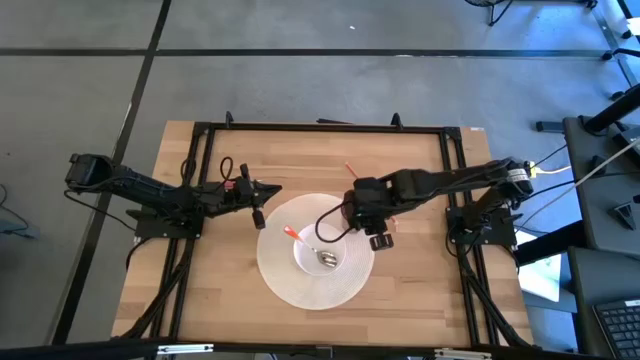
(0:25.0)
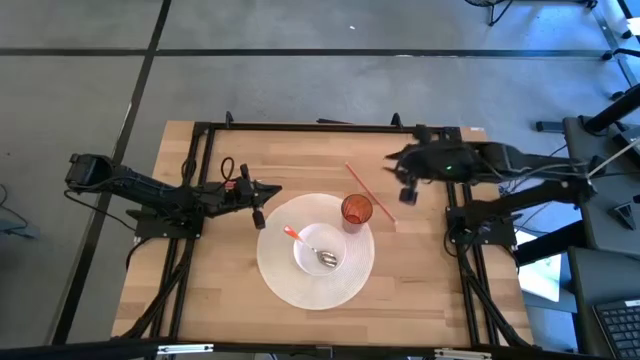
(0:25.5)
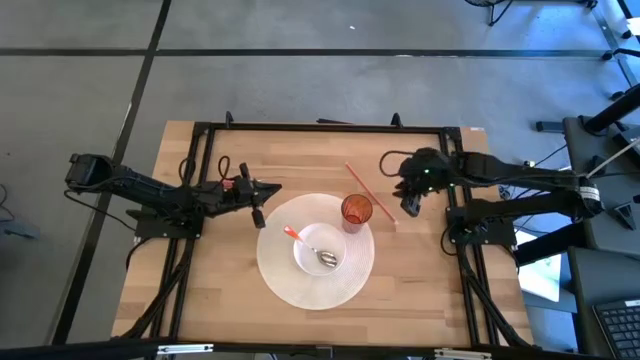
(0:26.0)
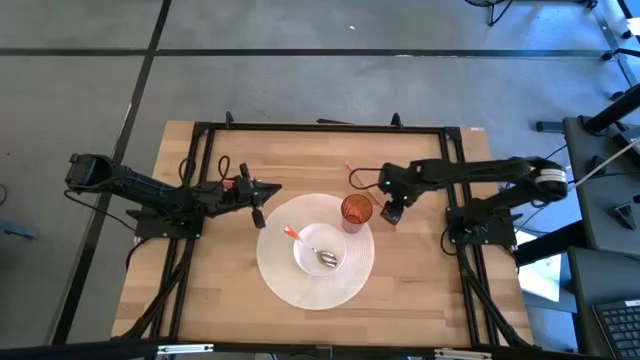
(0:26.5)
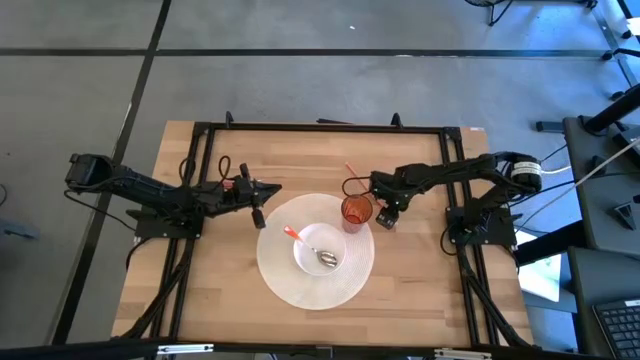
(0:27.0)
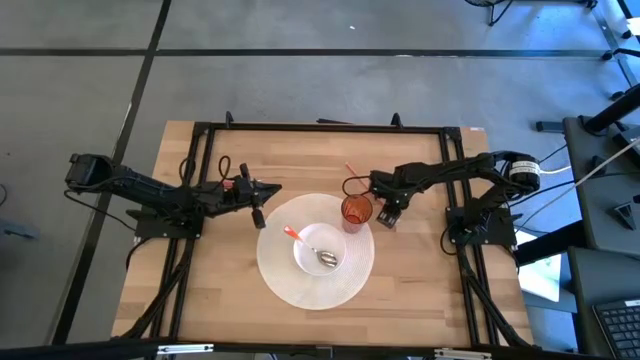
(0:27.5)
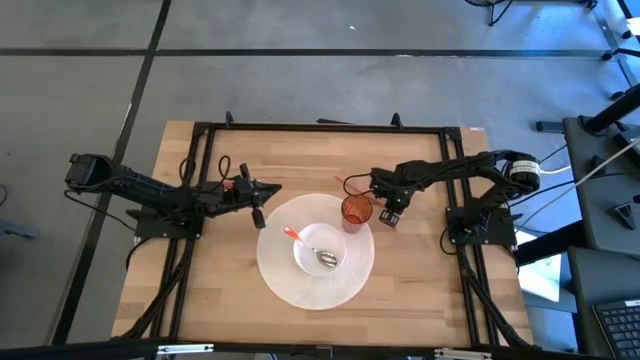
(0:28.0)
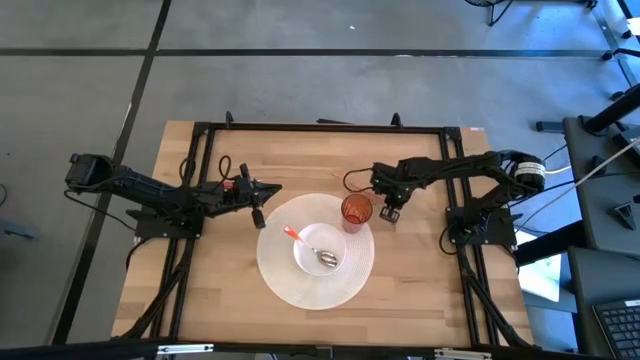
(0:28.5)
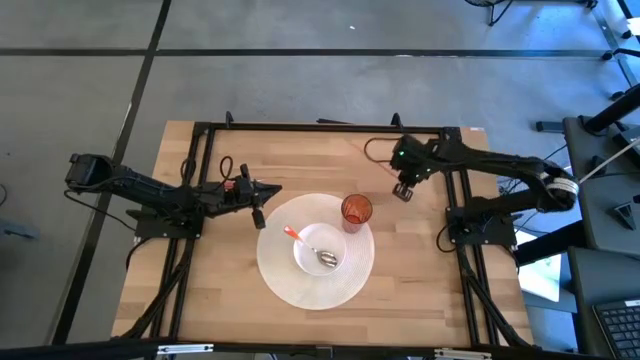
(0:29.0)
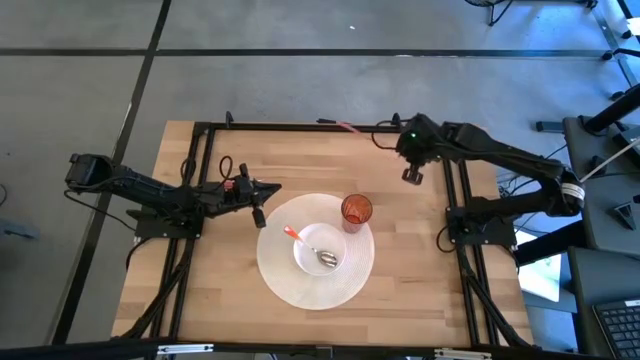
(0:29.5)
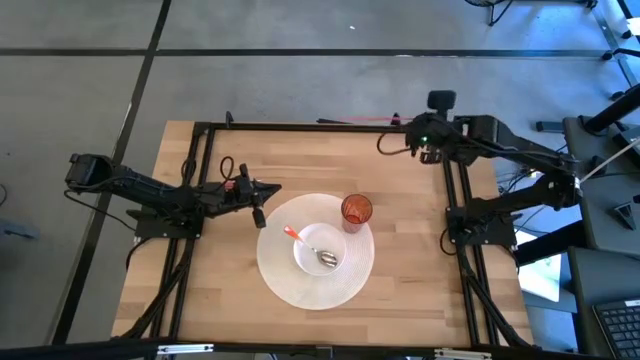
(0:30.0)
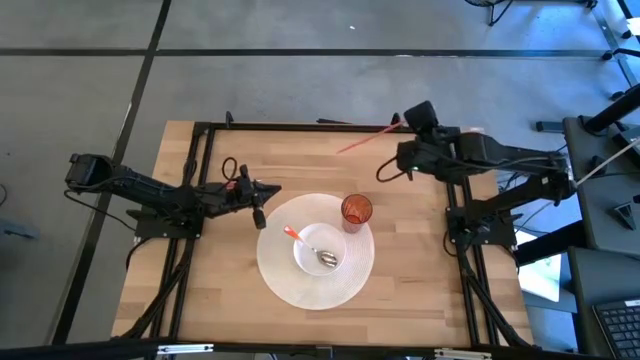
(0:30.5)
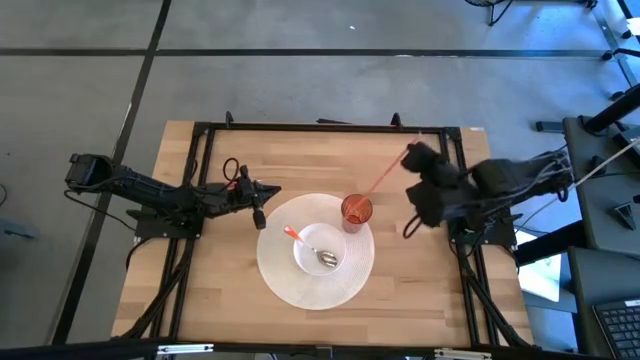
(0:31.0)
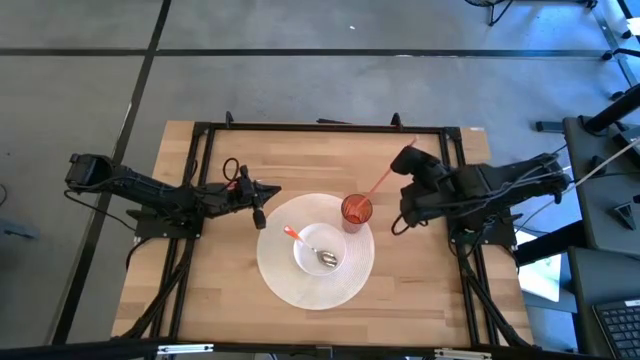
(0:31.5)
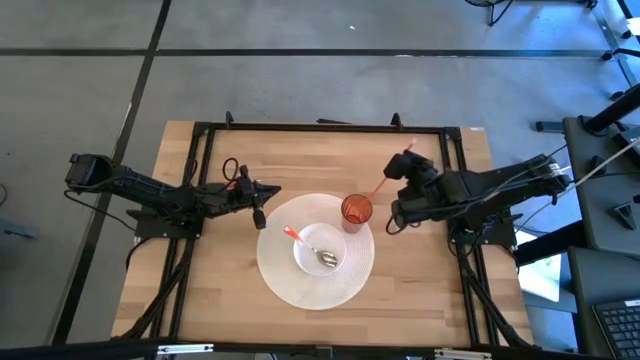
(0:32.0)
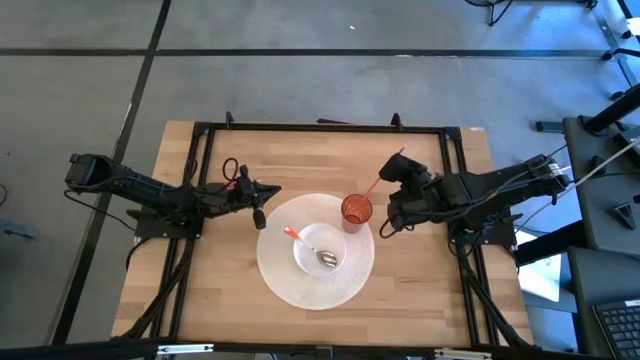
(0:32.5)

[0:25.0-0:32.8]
Task: Pick & Place Utensil
Put the red straw into the red cup

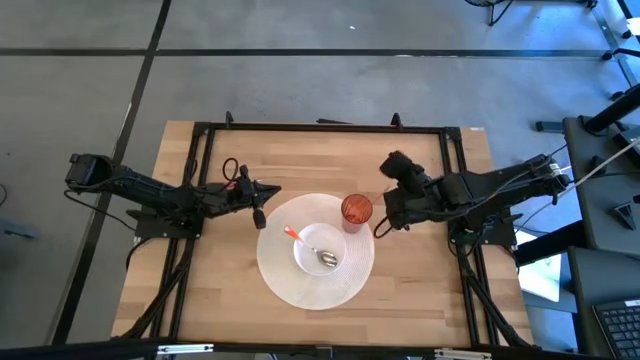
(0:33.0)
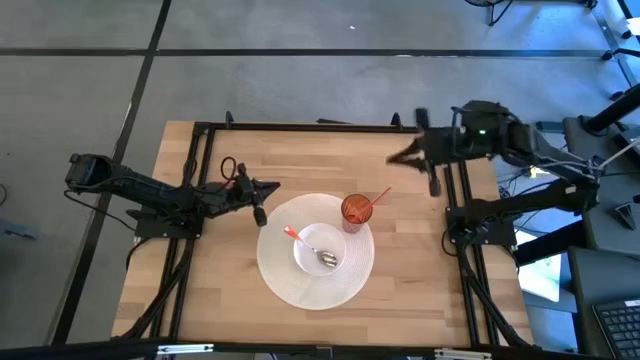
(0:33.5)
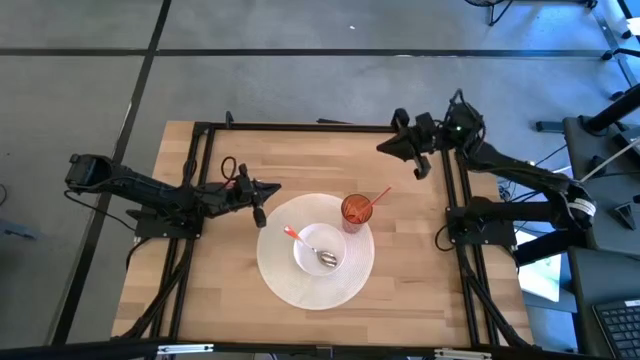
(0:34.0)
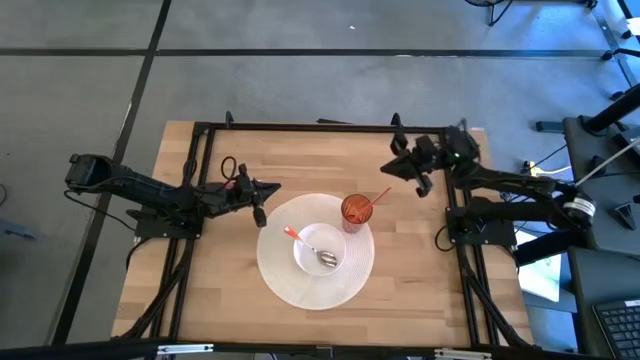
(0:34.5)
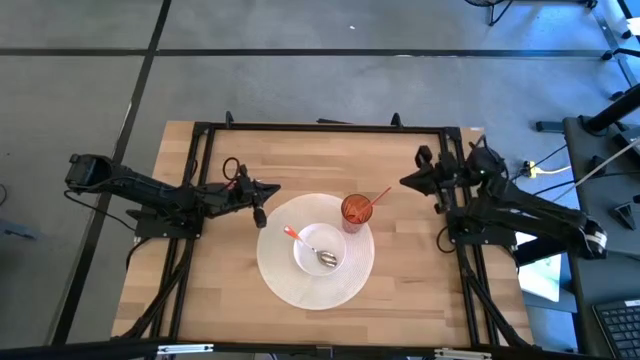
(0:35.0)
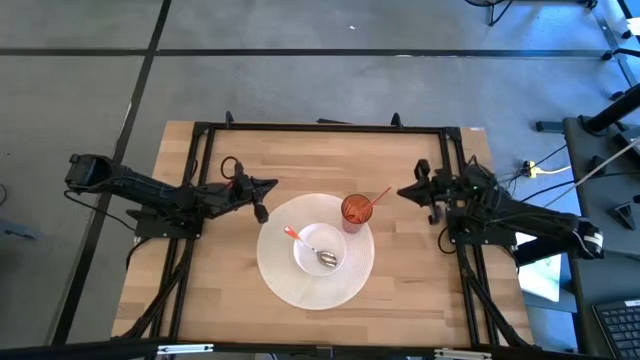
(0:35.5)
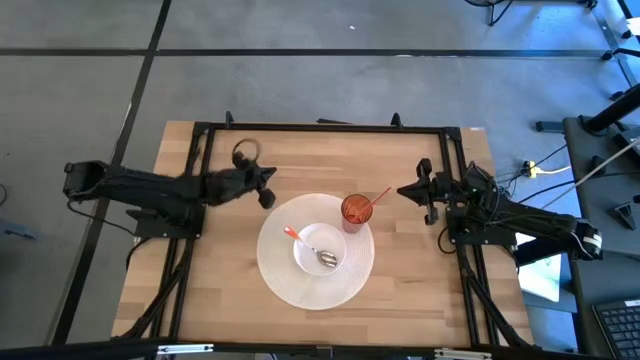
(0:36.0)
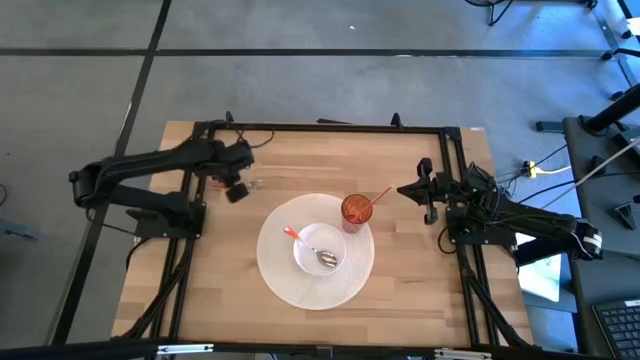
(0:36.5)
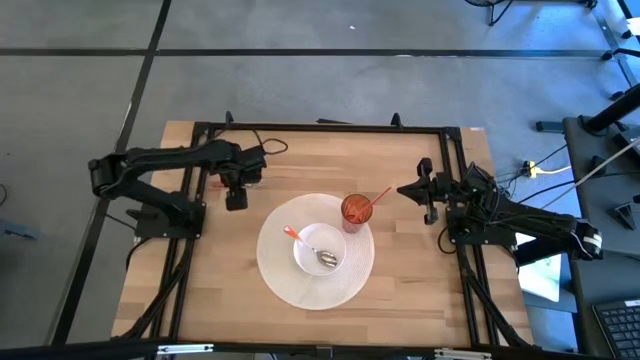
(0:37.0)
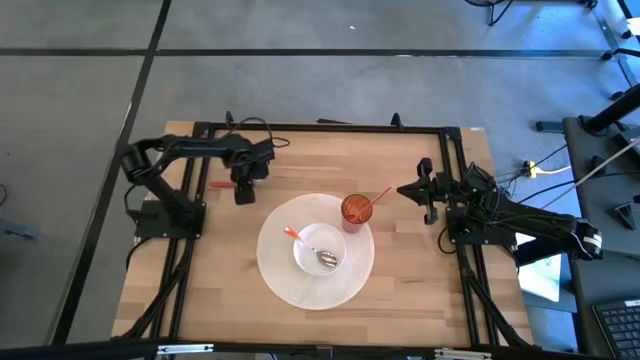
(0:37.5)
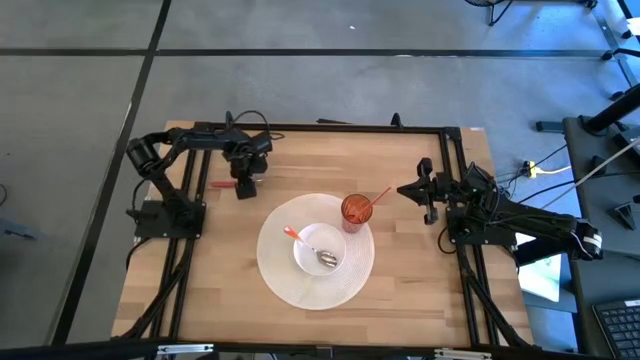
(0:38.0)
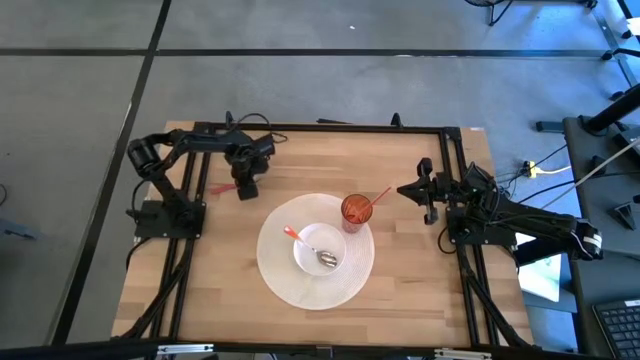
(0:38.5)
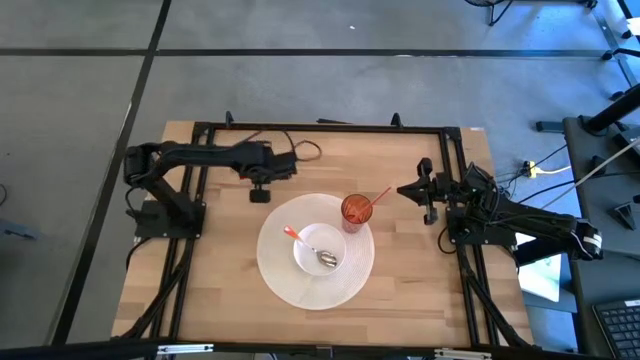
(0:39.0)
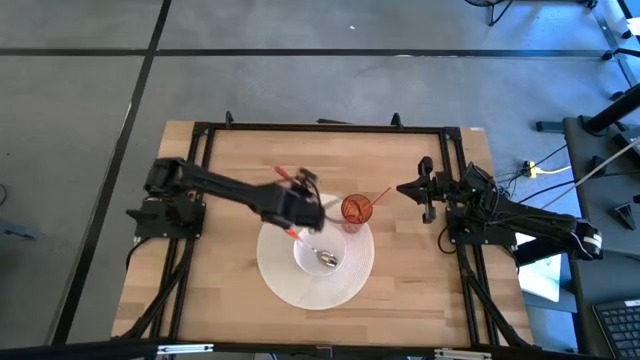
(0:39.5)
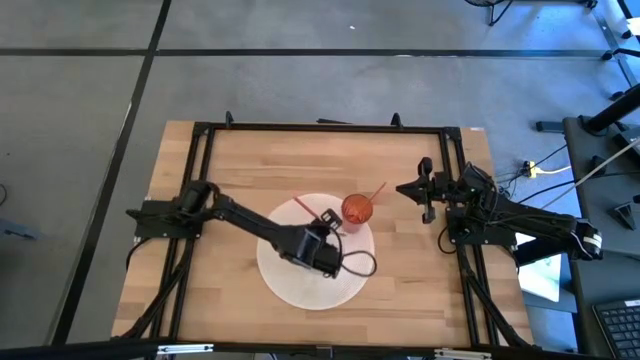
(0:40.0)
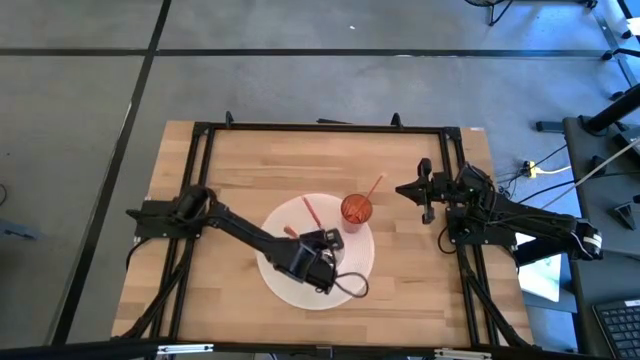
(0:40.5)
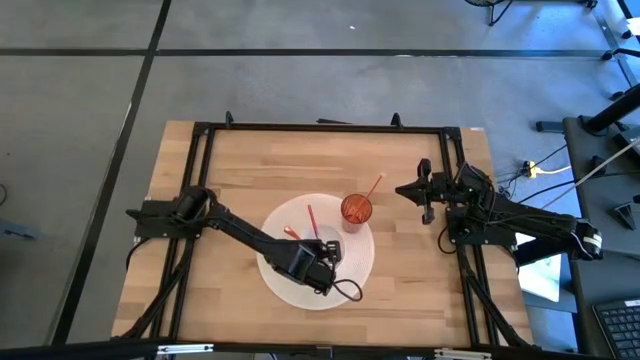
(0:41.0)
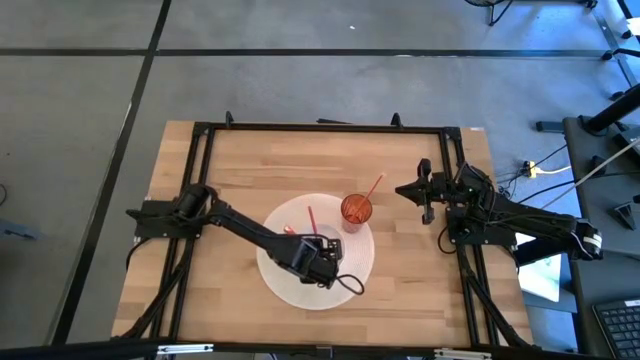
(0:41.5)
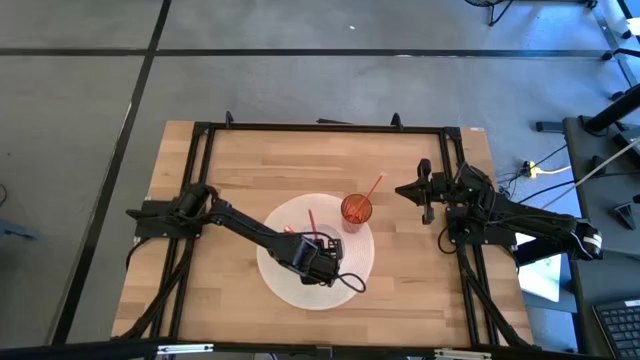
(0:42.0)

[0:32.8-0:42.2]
Put the pink fork into the white bowl

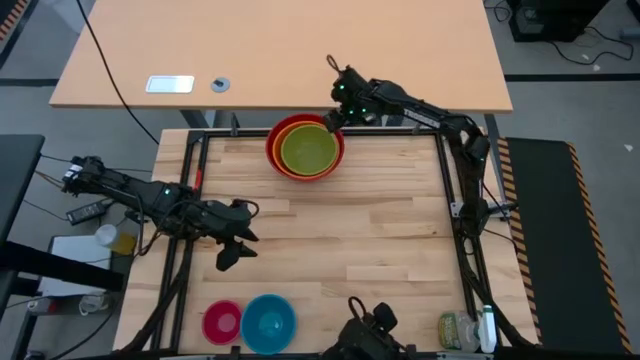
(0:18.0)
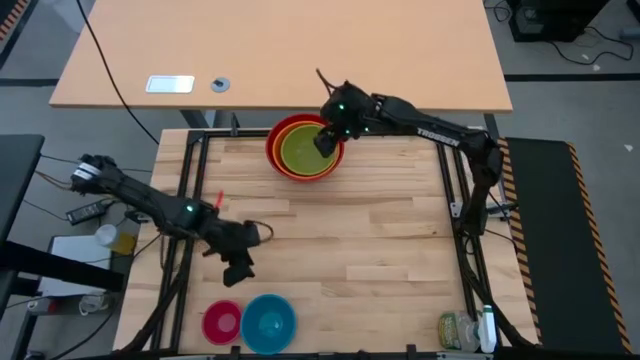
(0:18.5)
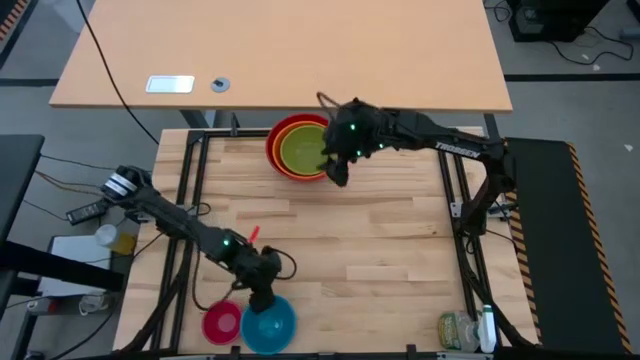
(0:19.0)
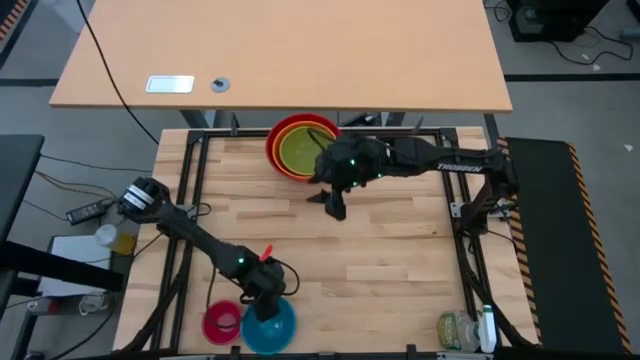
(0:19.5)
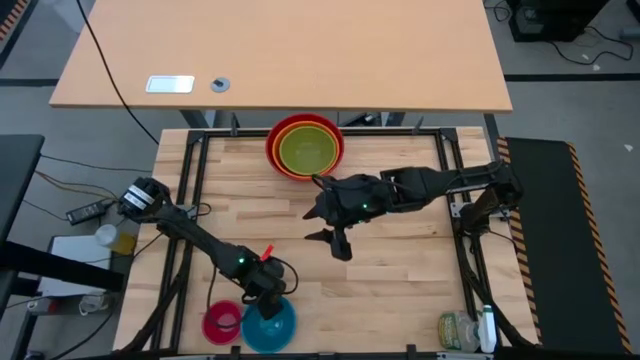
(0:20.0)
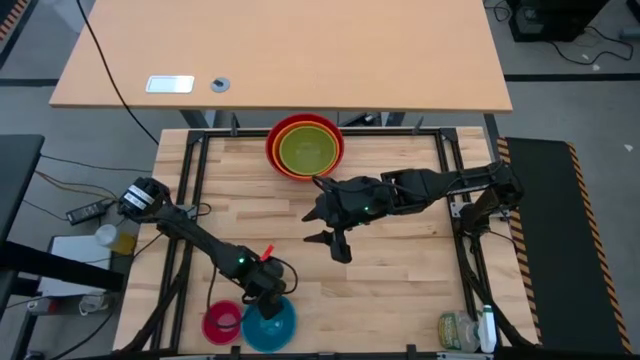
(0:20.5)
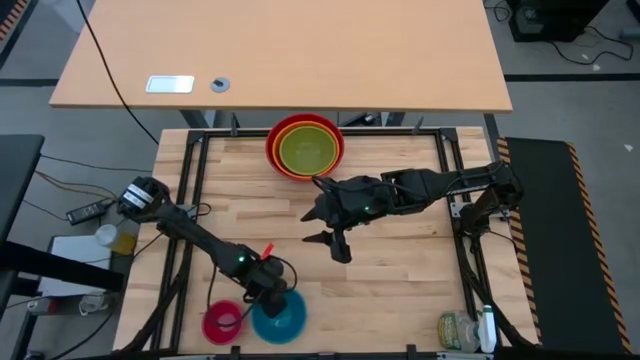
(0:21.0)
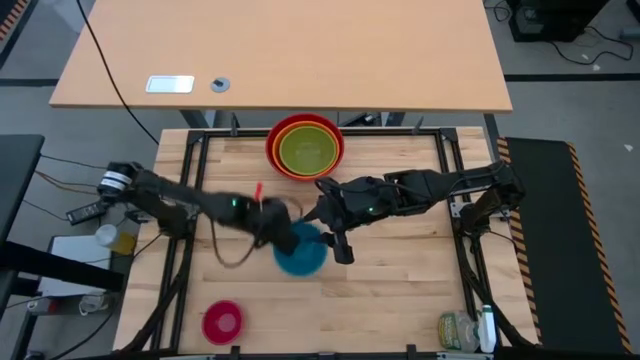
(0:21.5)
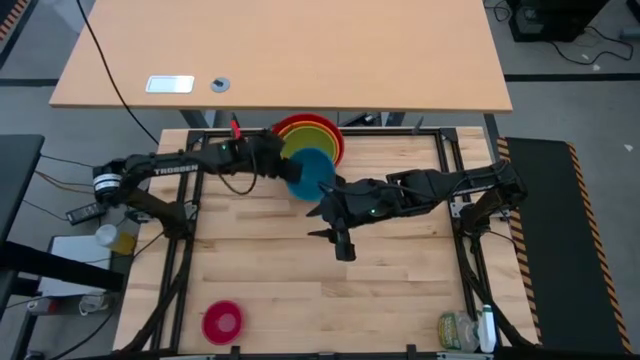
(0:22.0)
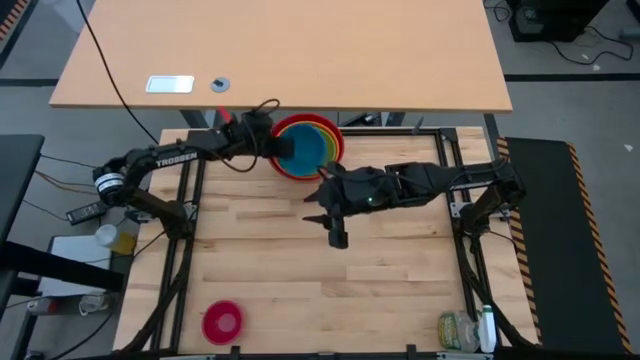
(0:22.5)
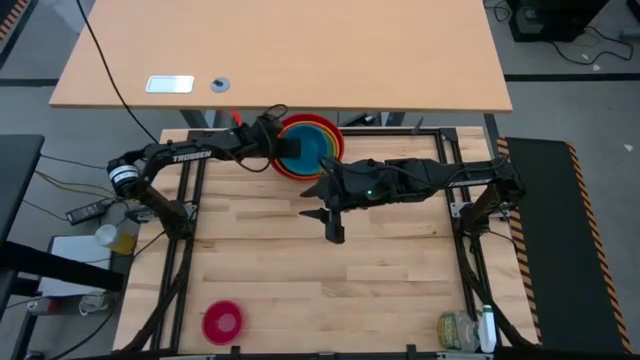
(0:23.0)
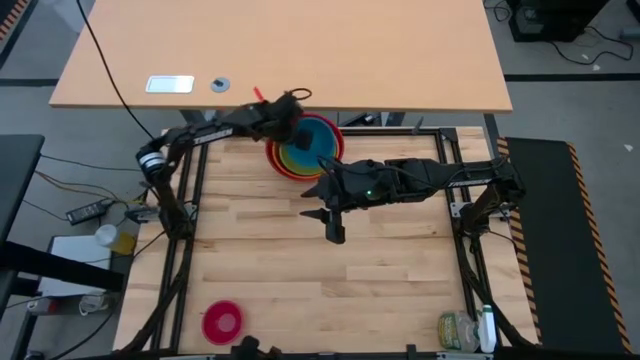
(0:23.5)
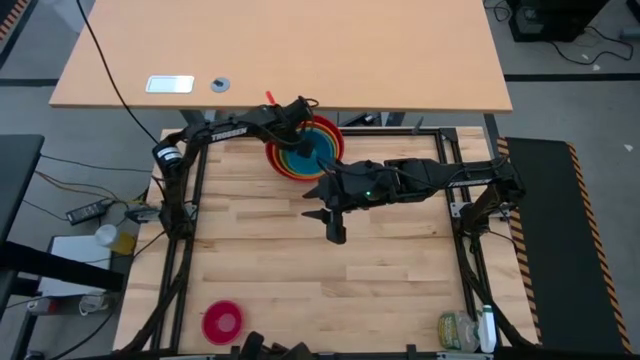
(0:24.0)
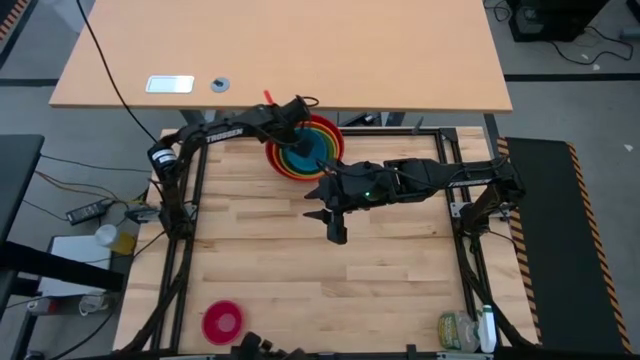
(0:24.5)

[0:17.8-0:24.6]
Task: Nest bowls inside each other by size order
Stack the blue bowl on the green bowl
